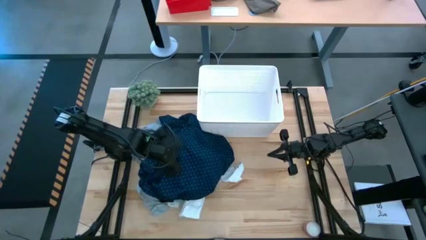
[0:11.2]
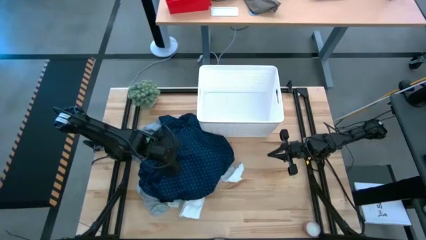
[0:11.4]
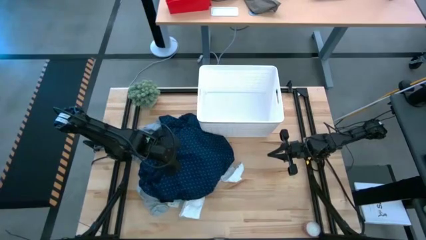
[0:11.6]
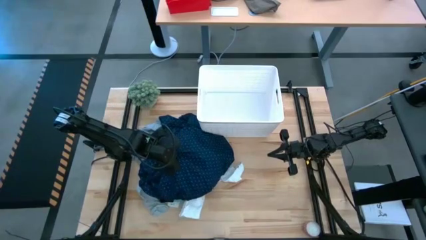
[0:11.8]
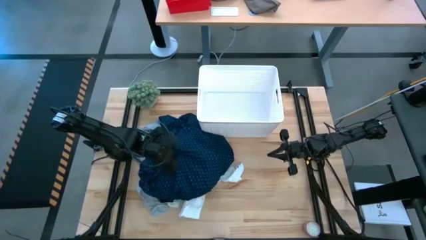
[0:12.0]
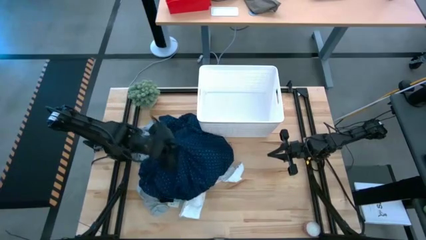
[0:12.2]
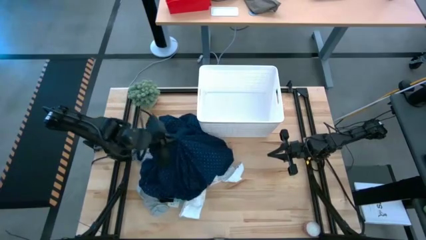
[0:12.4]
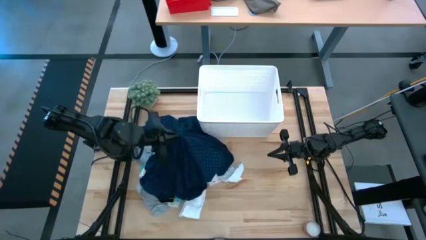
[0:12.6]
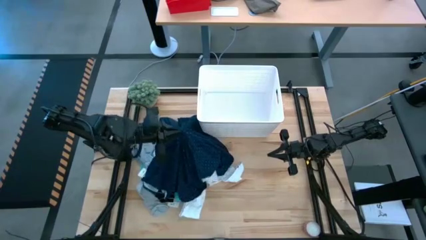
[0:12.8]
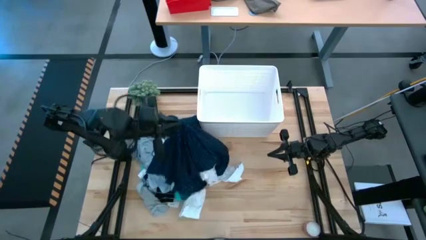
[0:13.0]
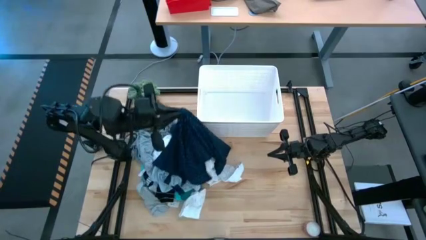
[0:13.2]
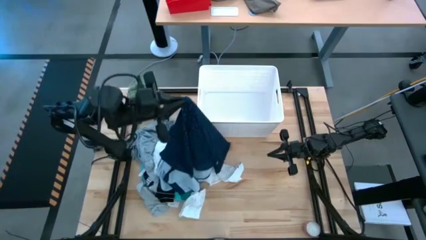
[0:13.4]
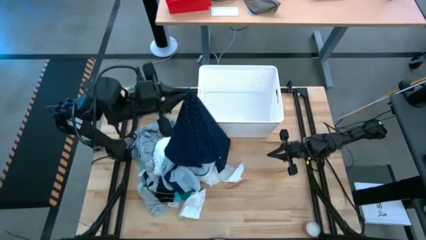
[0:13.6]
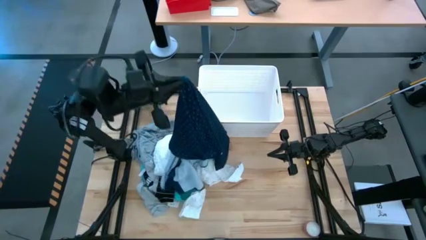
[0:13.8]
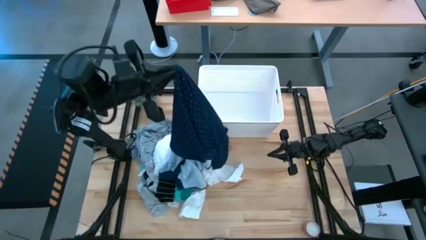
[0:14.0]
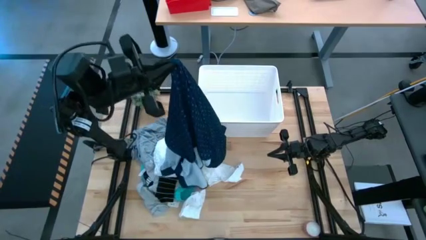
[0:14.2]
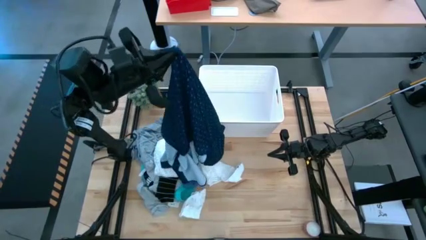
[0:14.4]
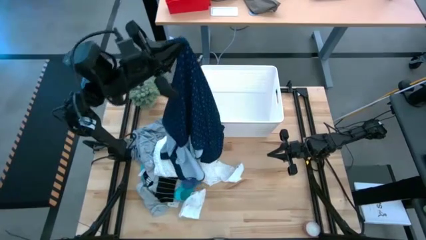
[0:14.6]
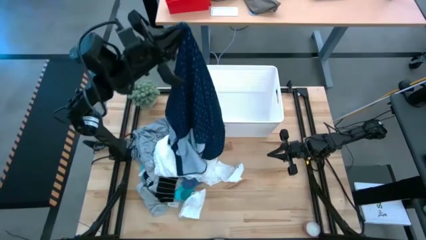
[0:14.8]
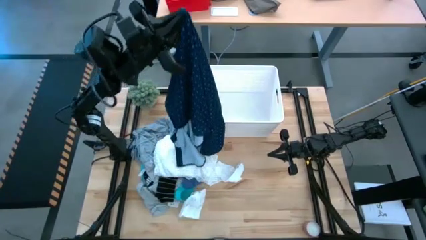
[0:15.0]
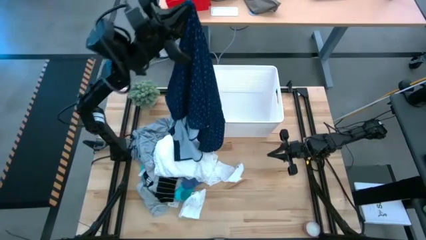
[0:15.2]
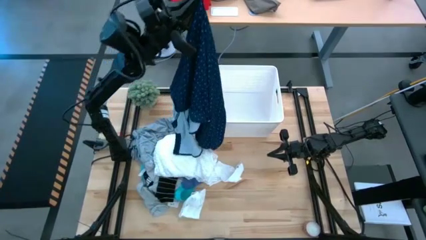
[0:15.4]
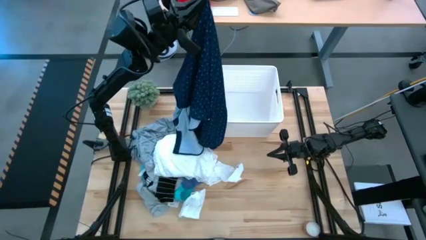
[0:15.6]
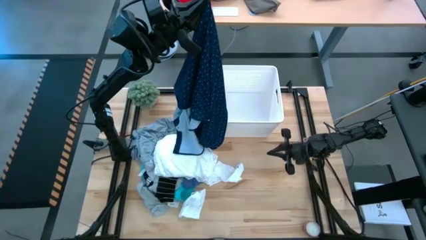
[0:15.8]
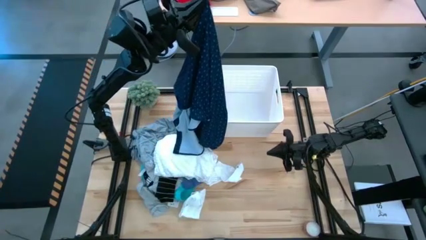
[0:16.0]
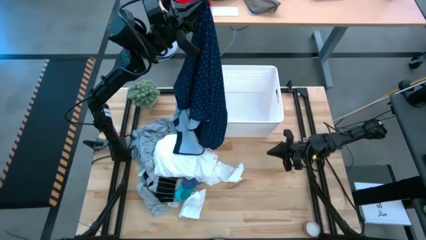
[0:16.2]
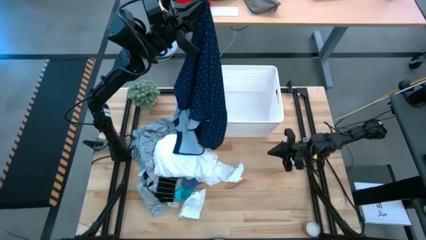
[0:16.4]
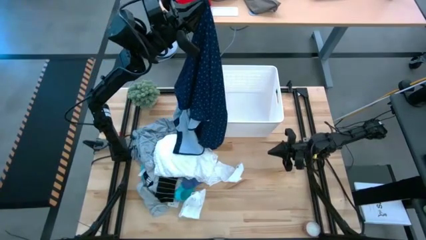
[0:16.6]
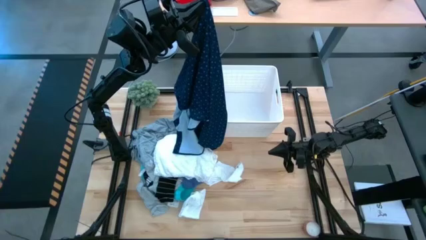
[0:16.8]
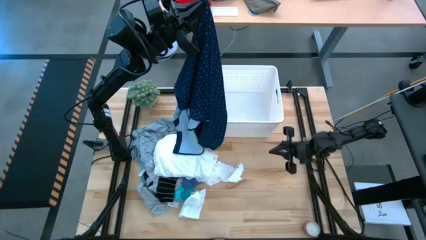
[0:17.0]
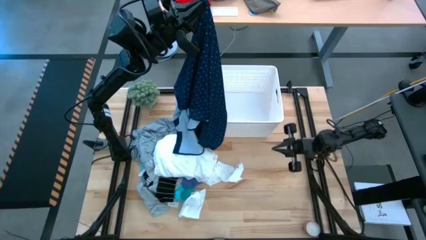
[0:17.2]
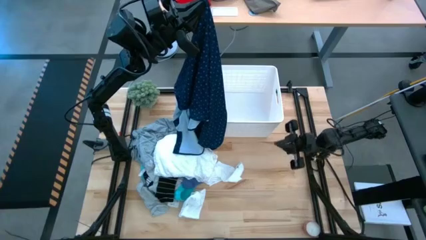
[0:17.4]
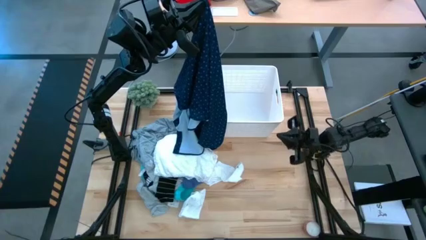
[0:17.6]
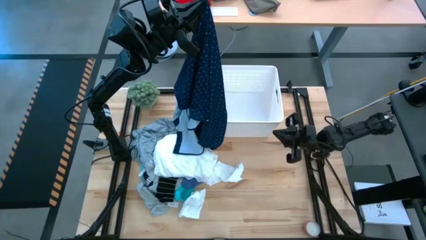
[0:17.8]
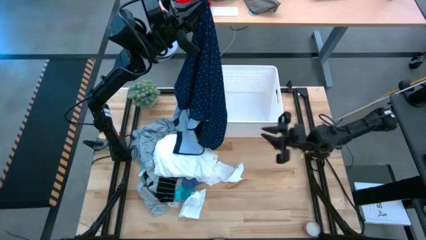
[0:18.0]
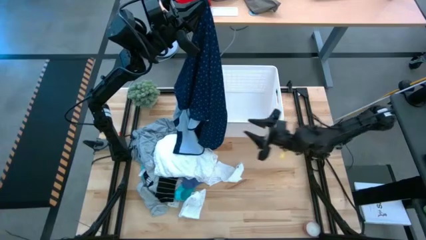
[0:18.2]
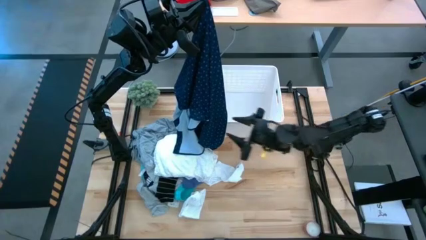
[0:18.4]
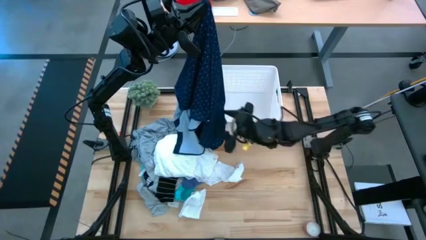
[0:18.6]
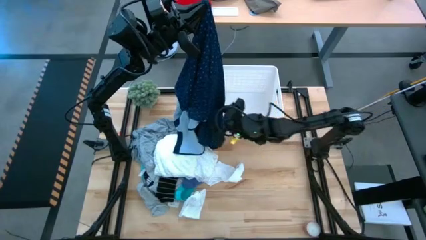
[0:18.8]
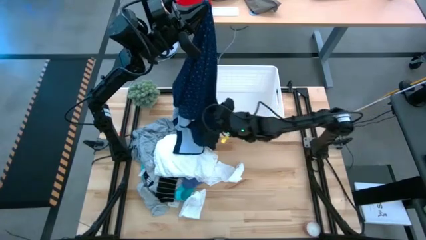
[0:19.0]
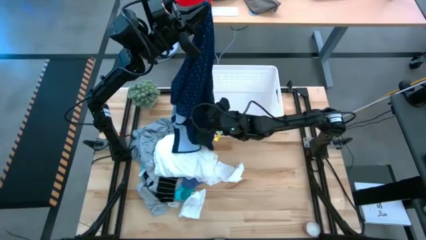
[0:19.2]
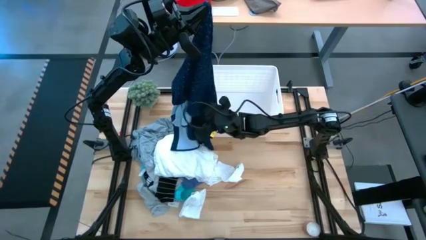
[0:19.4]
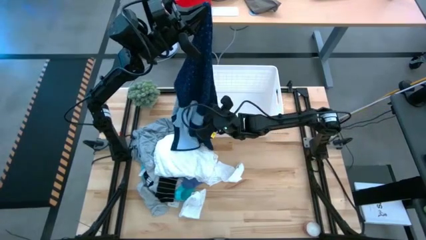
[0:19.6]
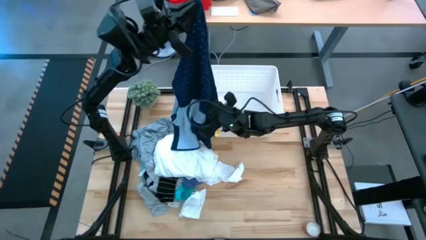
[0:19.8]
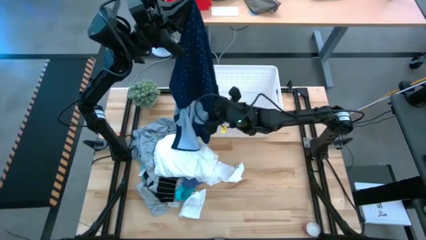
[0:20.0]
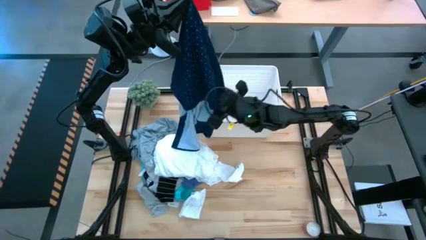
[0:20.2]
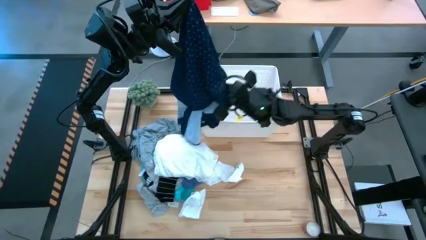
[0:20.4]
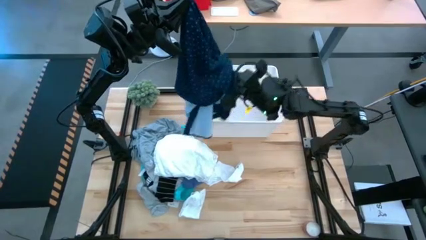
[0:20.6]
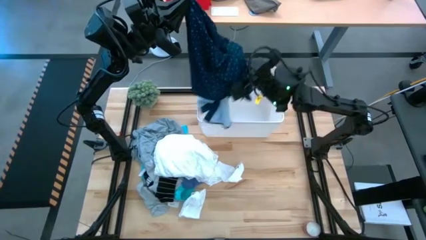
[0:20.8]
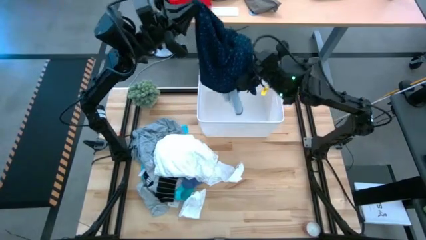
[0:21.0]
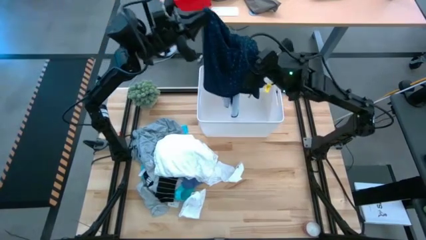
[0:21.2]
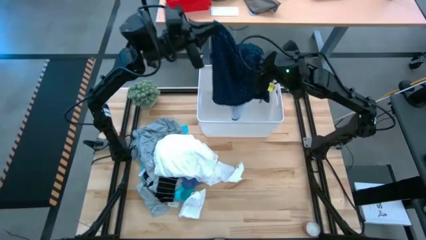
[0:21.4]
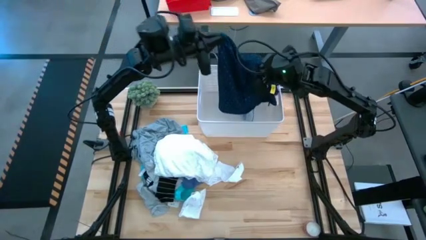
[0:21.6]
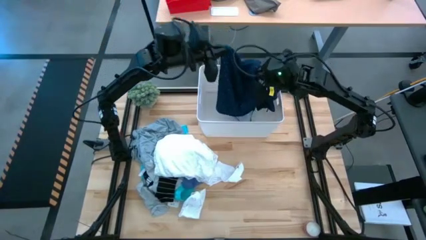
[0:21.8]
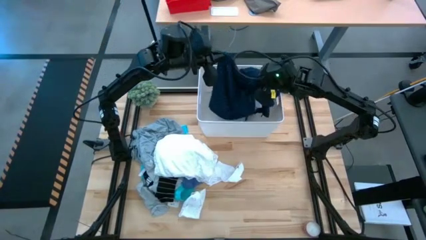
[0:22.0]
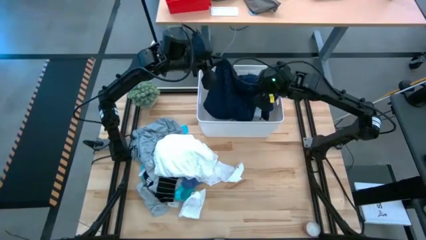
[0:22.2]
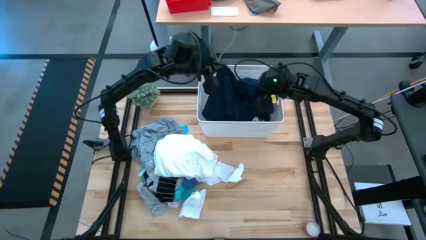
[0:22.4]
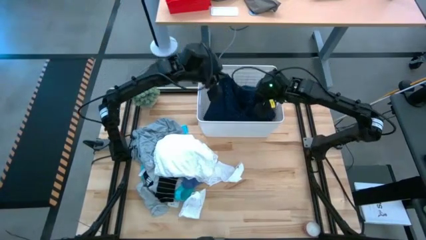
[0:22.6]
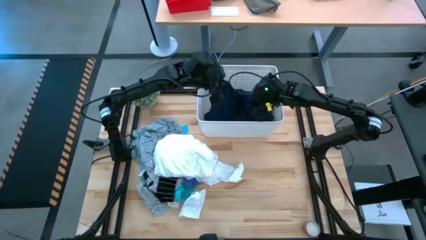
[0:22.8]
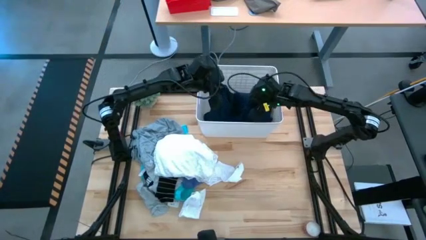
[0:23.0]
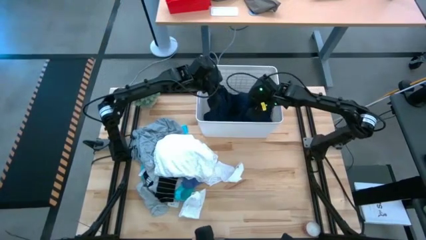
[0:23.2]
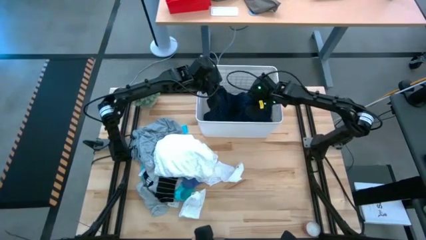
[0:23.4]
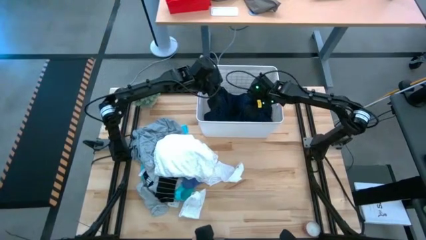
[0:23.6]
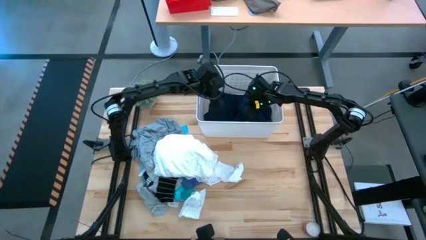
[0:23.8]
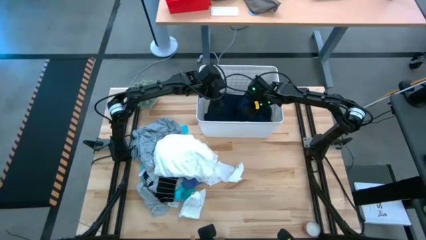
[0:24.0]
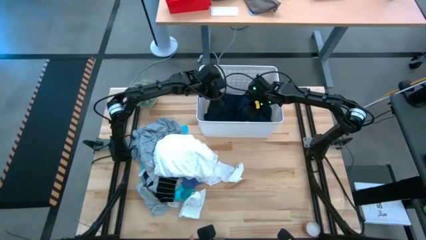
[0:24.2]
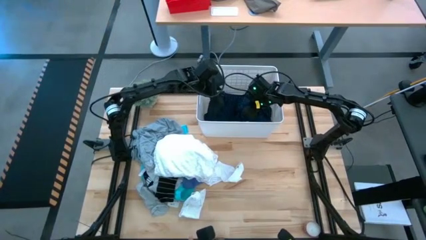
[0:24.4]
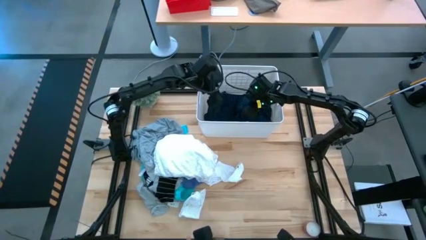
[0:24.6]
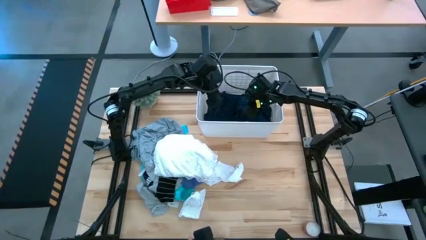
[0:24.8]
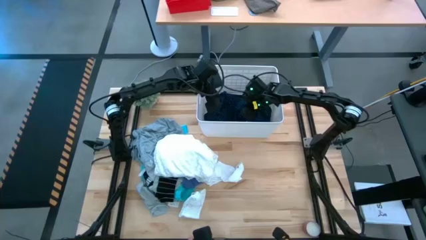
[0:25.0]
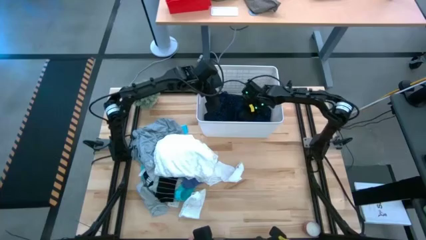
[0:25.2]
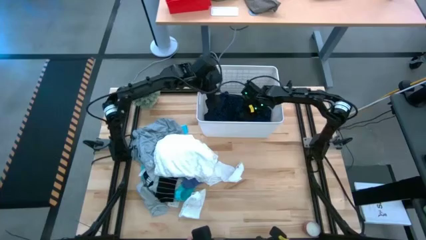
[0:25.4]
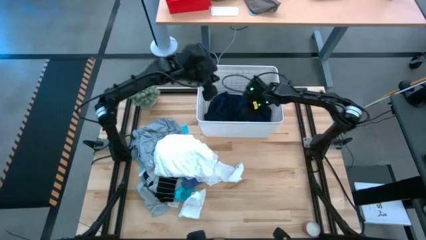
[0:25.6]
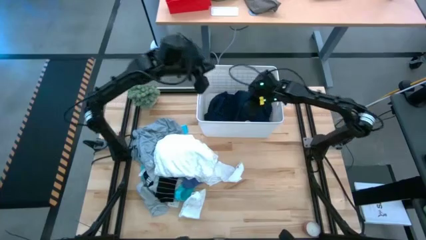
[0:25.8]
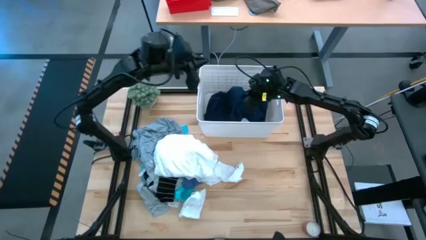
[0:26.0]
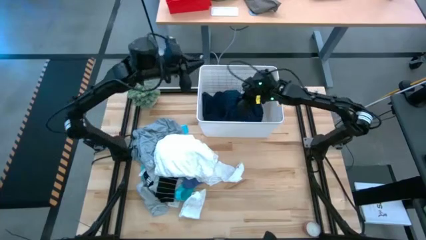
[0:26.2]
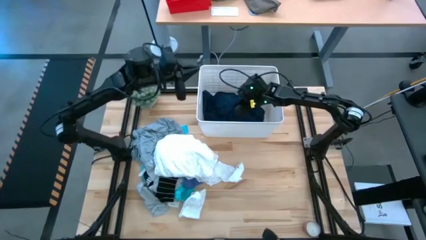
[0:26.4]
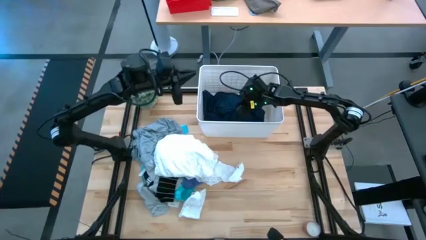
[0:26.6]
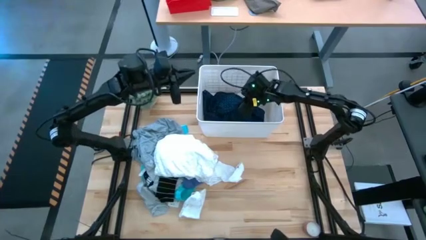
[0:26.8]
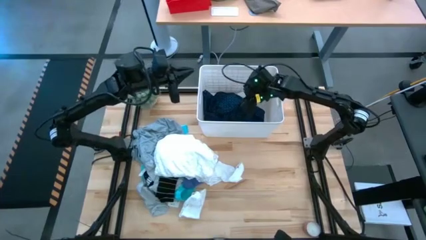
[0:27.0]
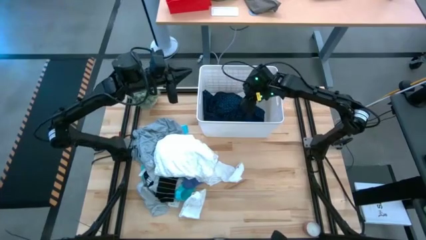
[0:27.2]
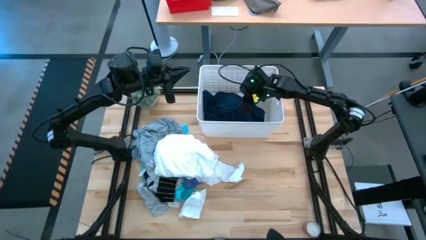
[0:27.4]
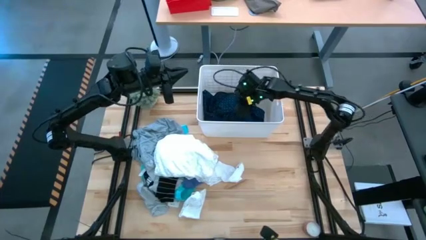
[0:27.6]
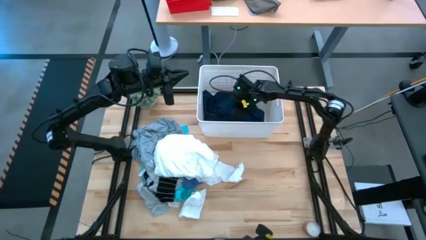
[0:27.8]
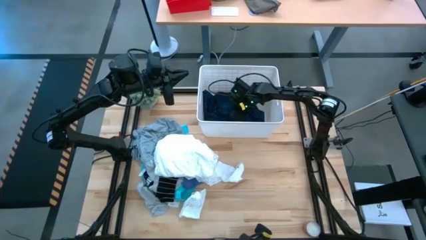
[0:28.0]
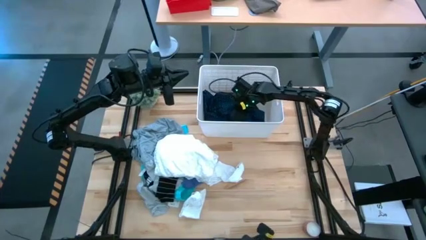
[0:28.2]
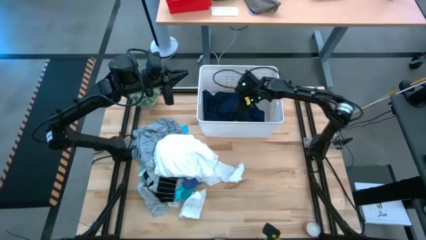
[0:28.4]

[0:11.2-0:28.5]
Task: Sort clothes
Put the blue polo shirt into the white bin
